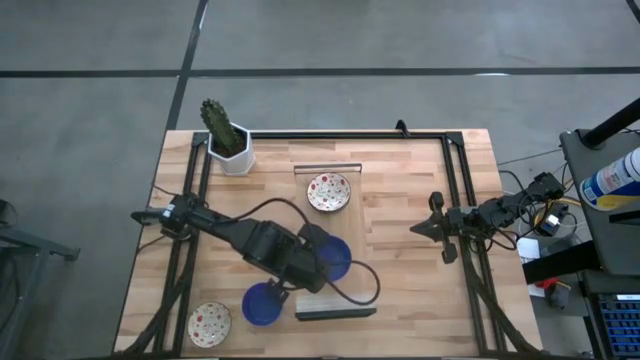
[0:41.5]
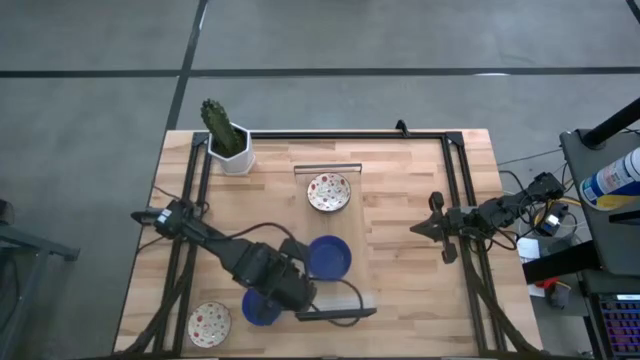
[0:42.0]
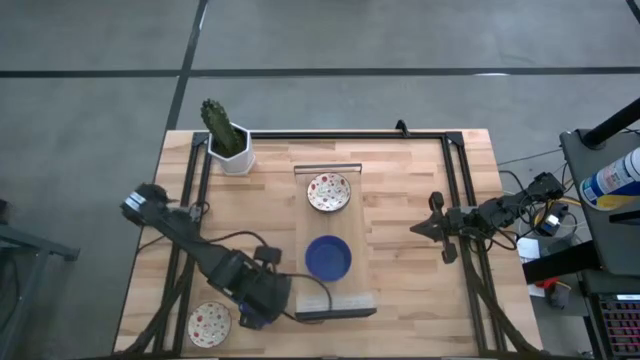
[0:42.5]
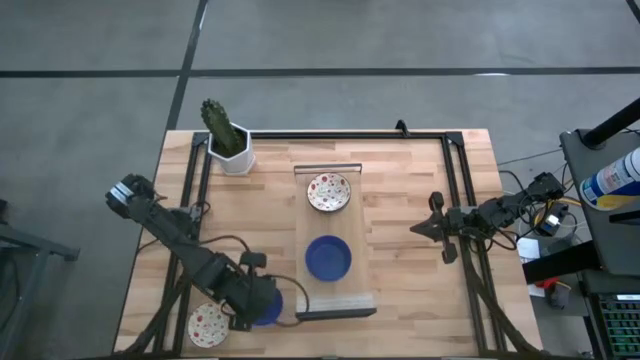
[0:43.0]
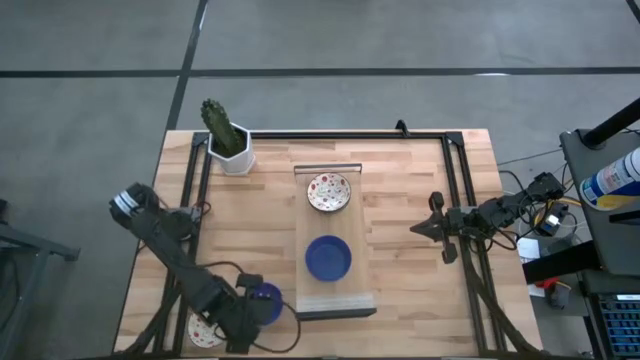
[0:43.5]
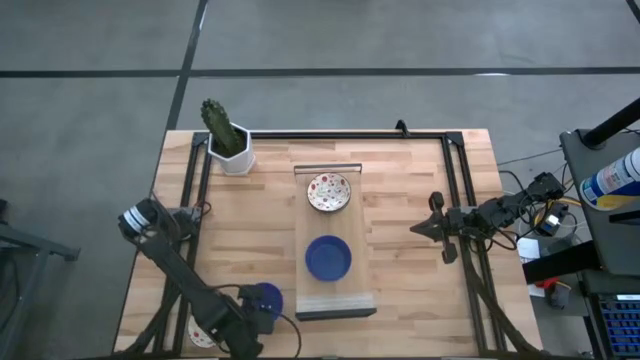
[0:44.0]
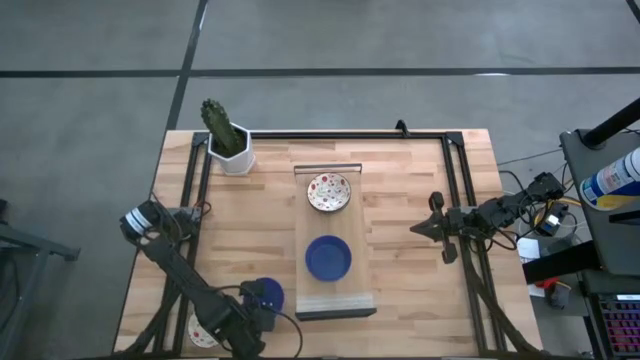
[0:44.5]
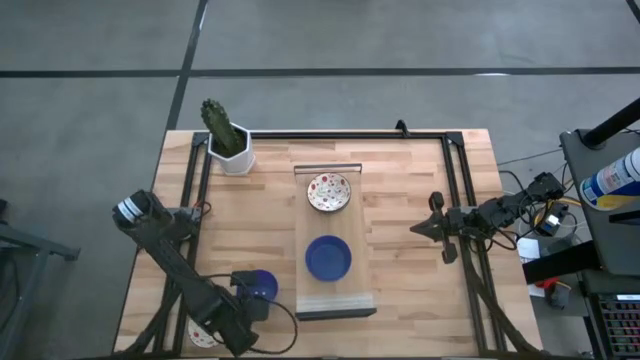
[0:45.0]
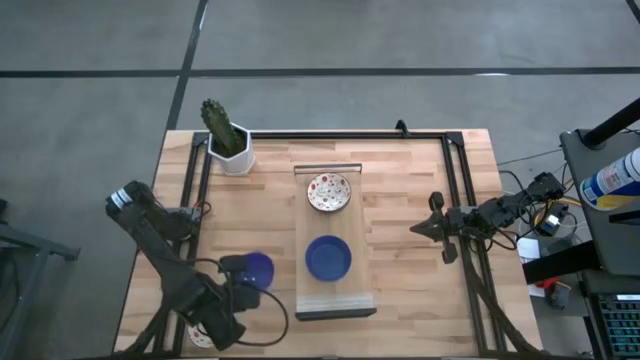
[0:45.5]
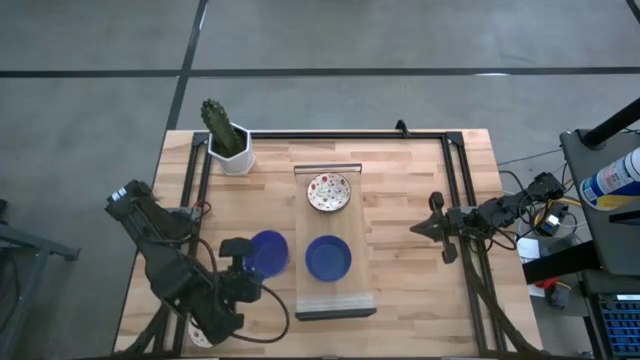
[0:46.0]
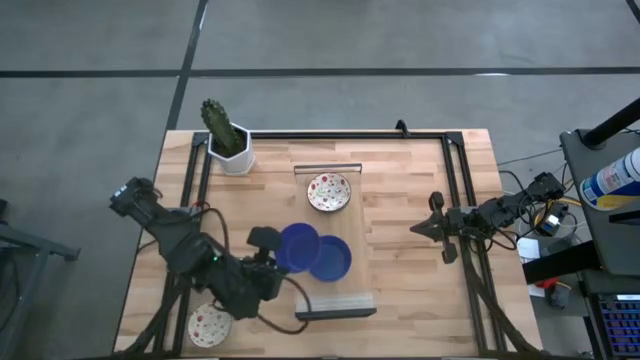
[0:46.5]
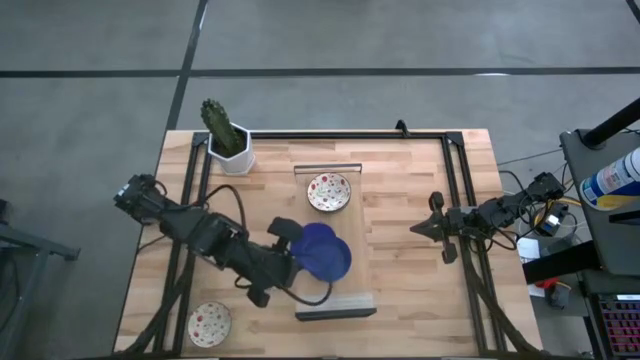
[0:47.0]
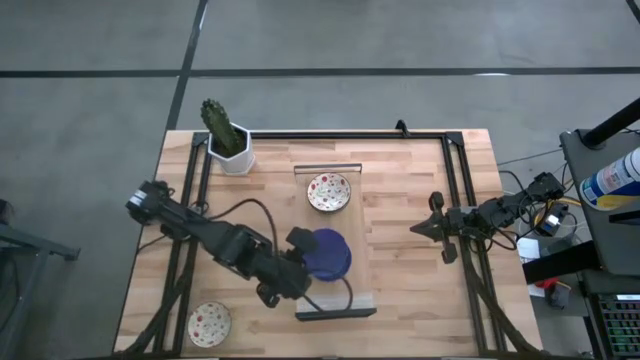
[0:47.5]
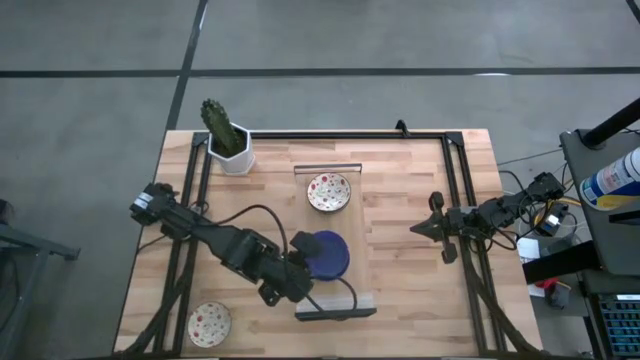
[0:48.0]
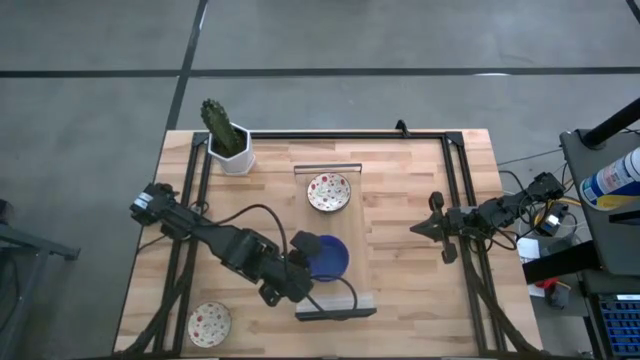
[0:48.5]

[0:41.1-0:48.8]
Task: Pick & Place Mini bowls
Stack the blue bowl on top of the blue bowls on the shelf

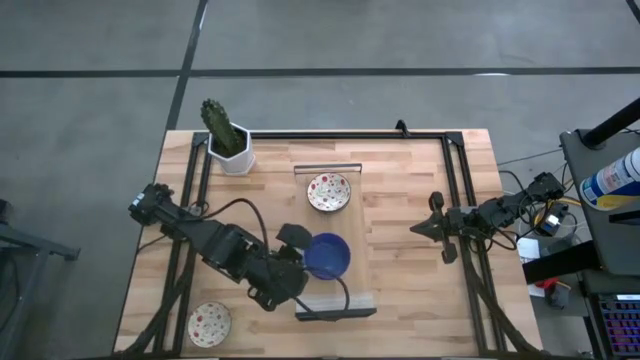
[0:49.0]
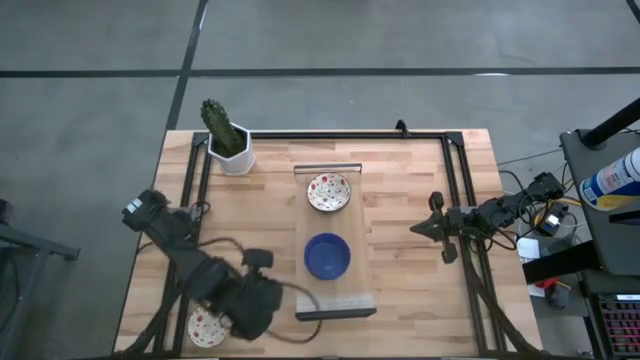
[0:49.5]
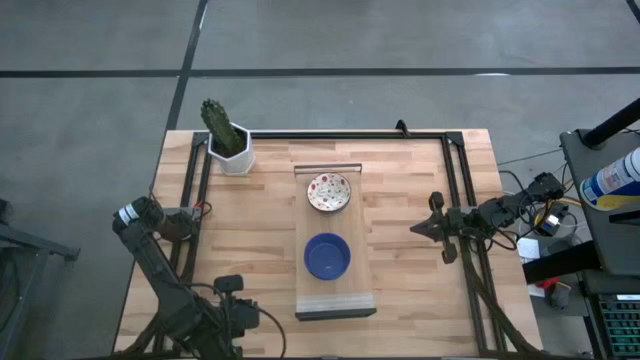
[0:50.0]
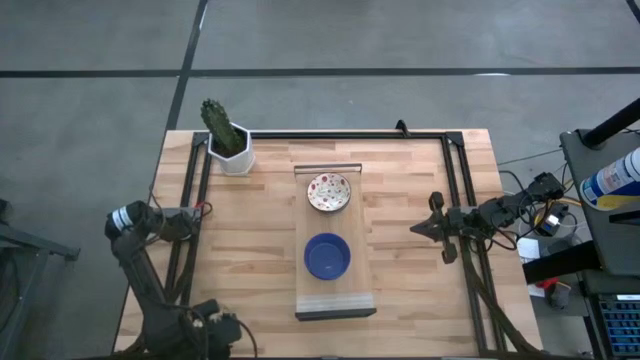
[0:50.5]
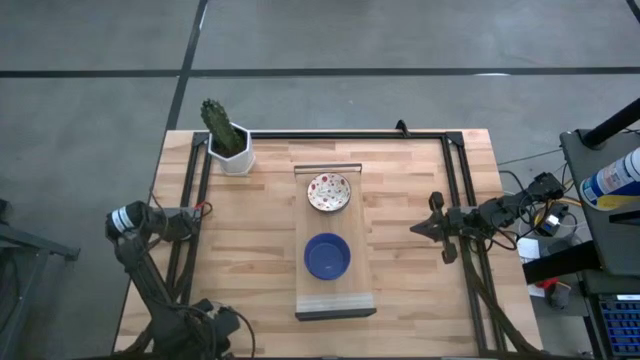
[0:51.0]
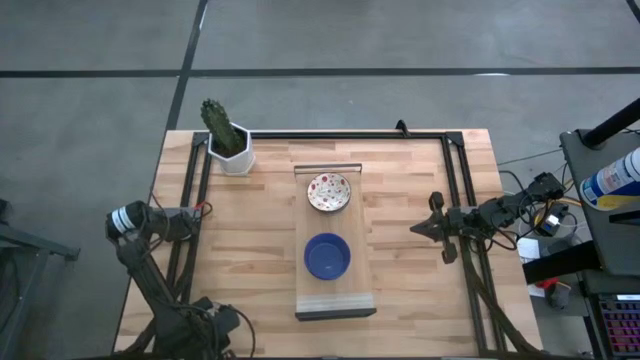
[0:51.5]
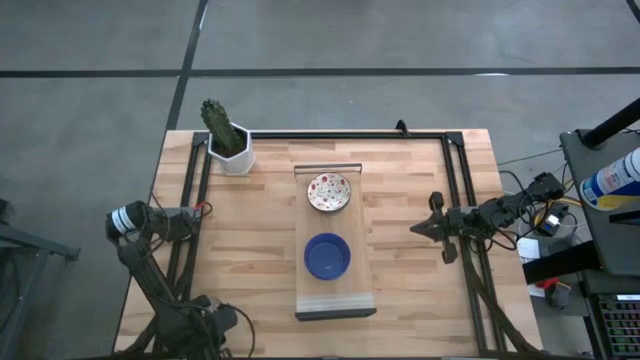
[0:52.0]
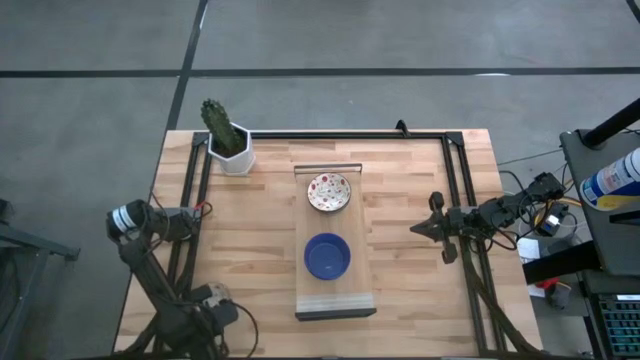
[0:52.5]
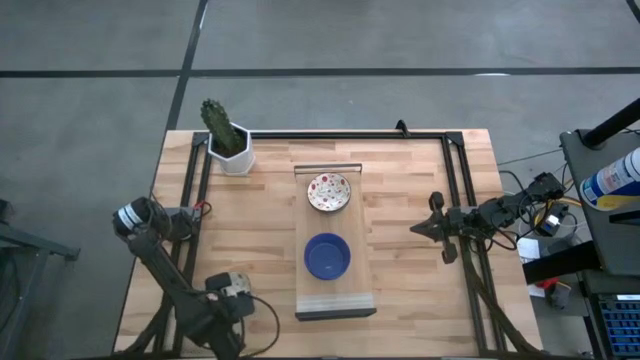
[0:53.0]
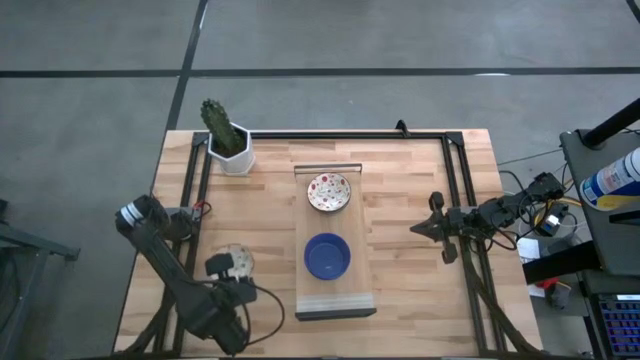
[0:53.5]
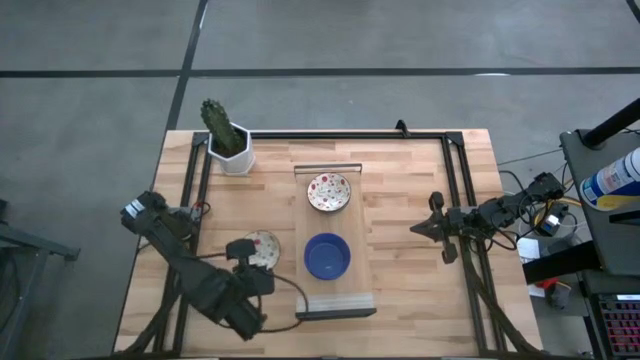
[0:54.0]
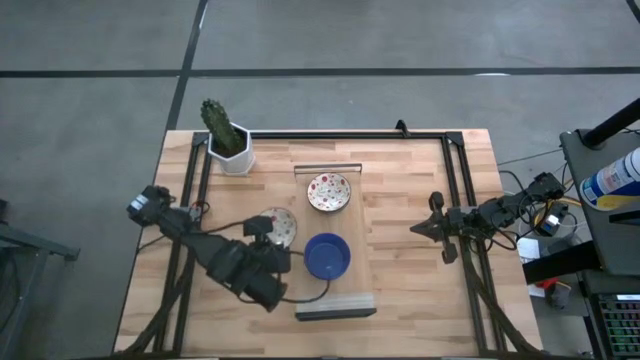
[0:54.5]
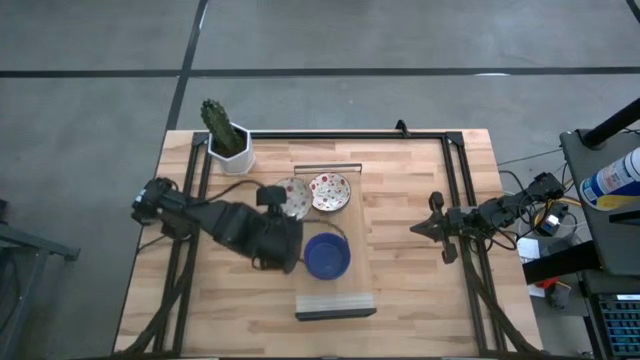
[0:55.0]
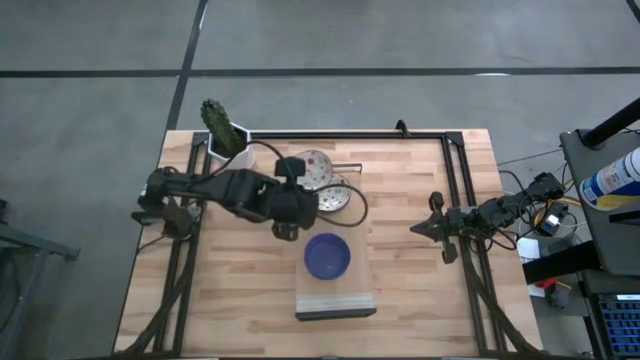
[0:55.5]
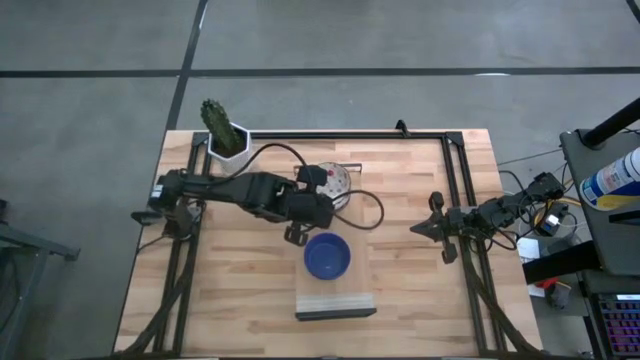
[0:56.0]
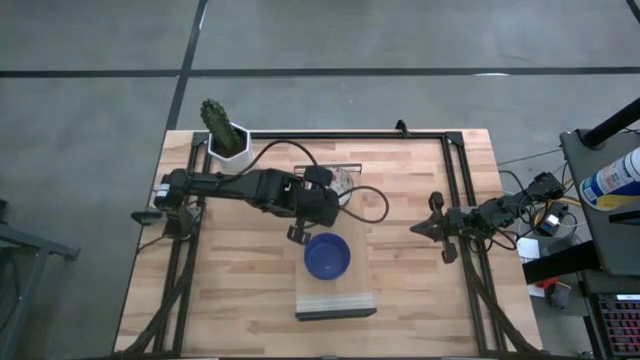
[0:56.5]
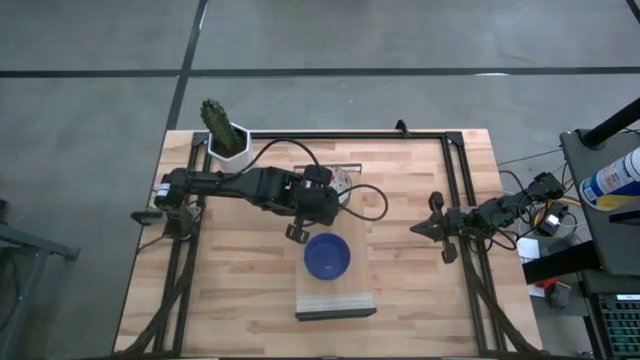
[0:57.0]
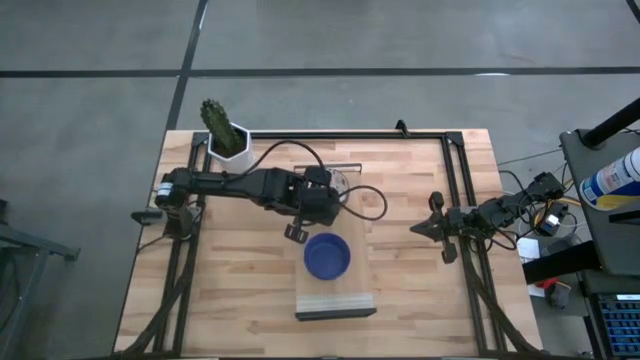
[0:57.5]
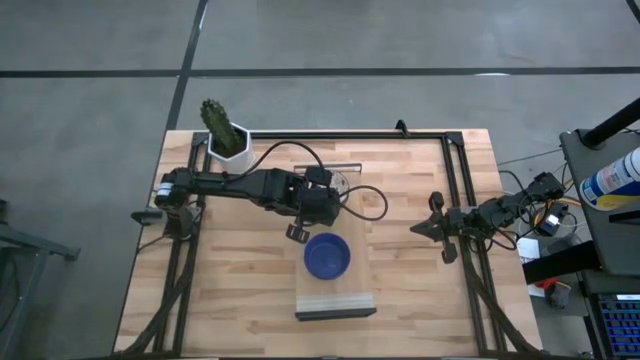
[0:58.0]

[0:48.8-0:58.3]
Stack the white patterned bowl on top of the white patterned bowls on the shelf

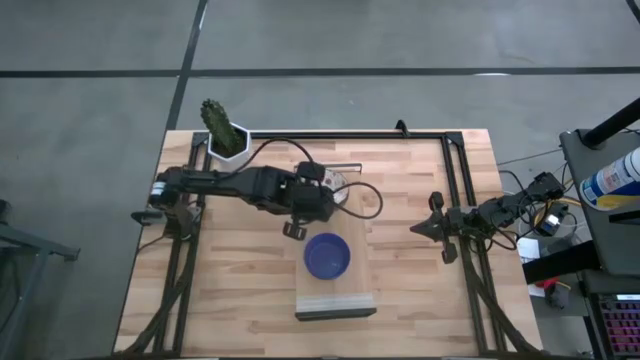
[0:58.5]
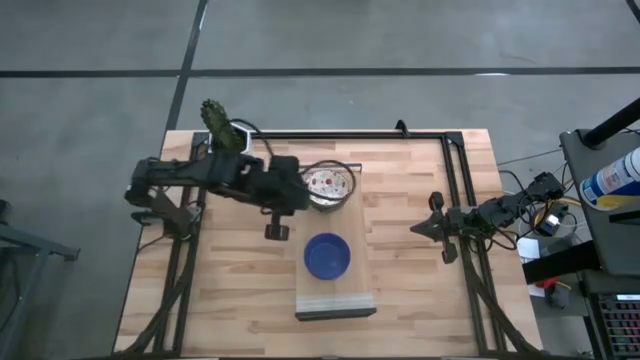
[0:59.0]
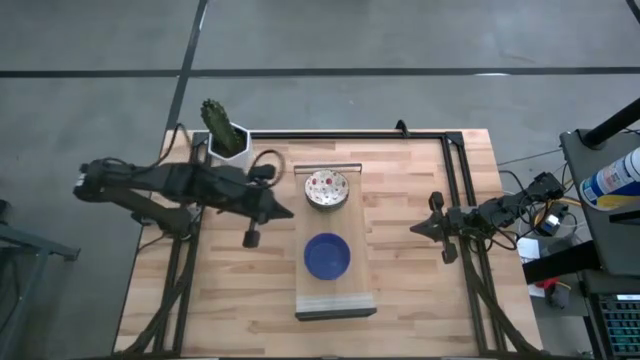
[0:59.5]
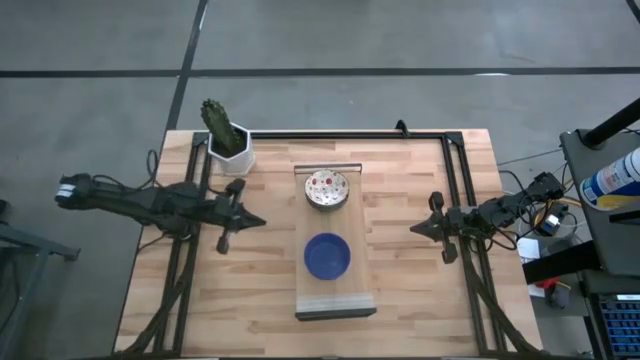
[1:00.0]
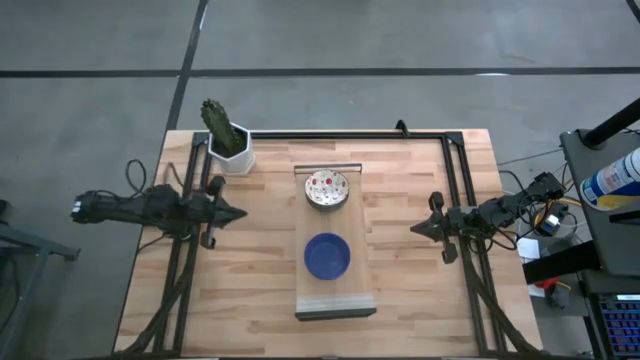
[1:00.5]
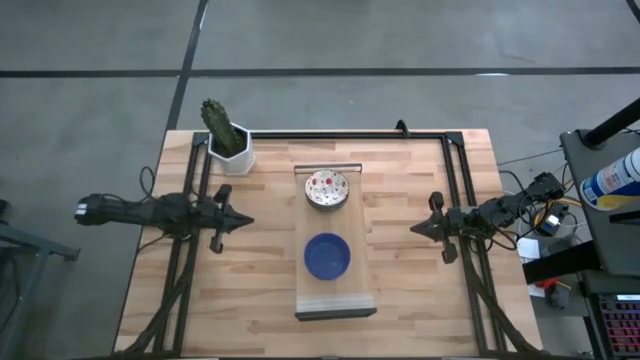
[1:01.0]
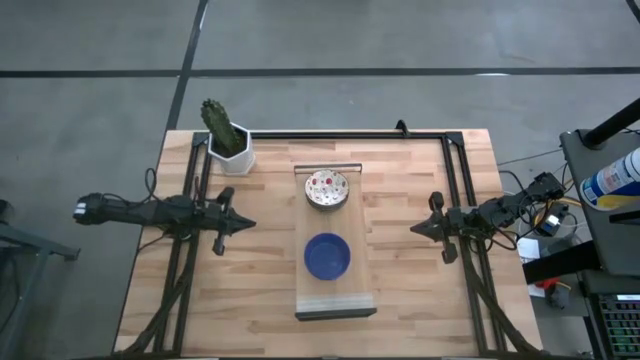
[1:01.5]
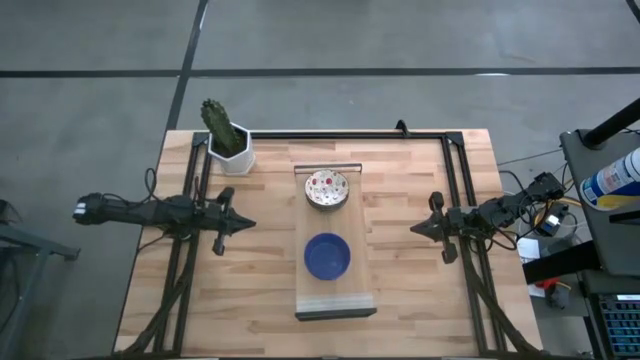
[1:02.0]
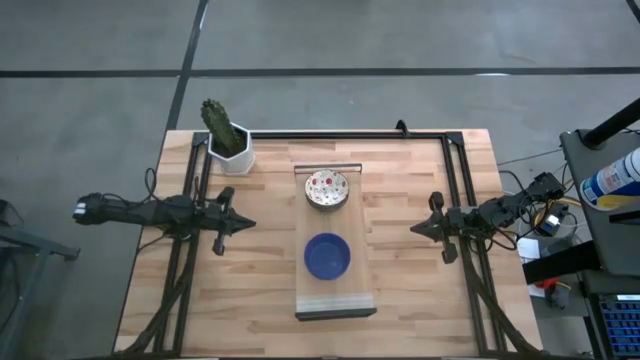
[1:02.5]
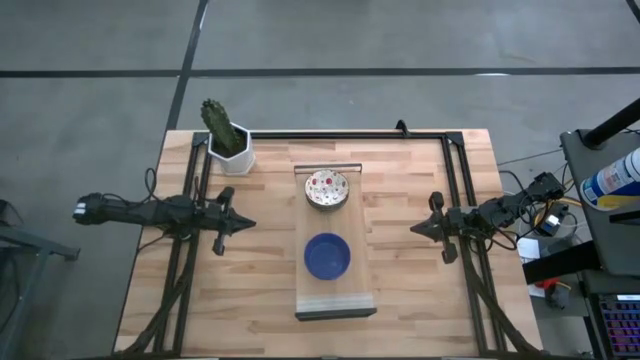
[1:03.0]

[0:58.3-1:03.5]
Return to Home Position
